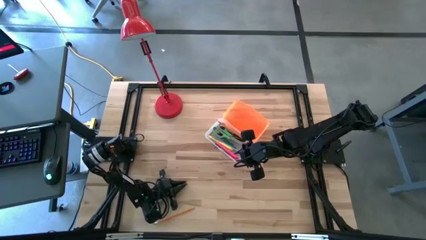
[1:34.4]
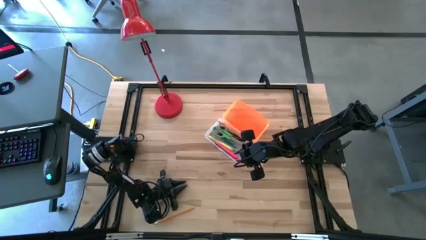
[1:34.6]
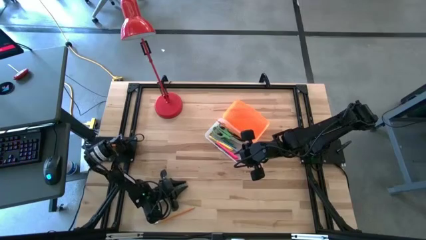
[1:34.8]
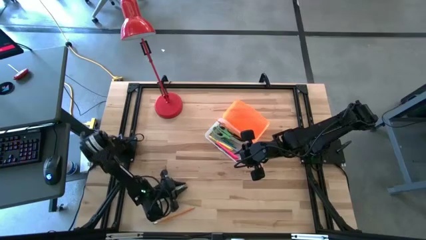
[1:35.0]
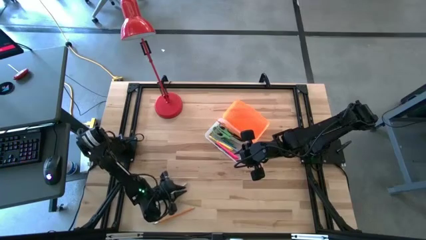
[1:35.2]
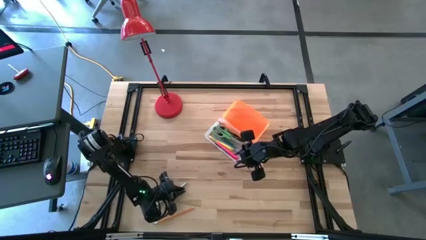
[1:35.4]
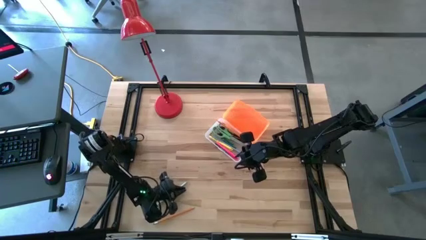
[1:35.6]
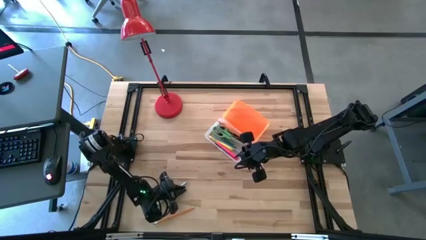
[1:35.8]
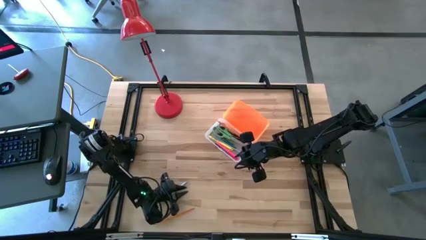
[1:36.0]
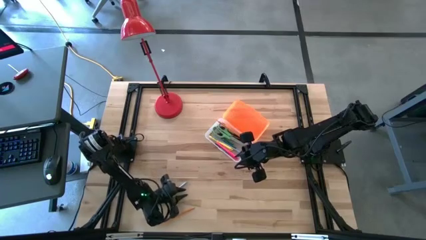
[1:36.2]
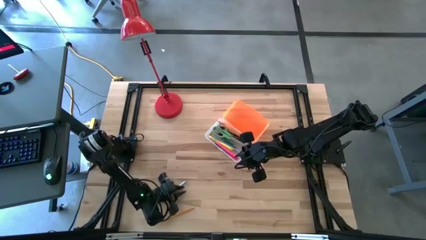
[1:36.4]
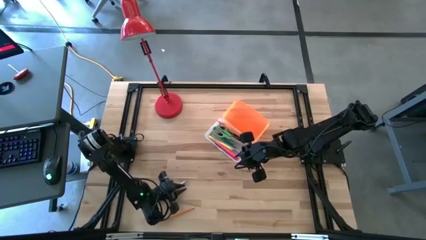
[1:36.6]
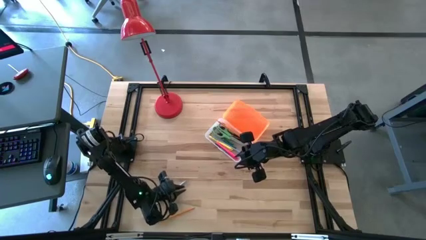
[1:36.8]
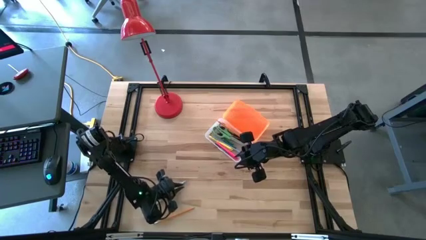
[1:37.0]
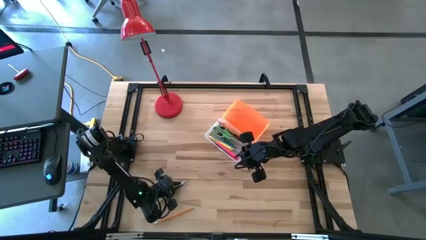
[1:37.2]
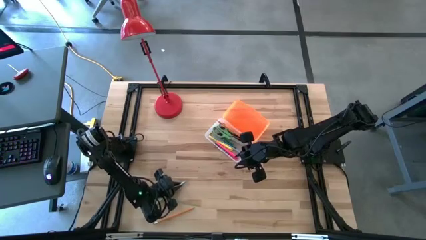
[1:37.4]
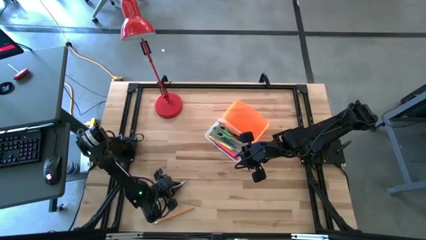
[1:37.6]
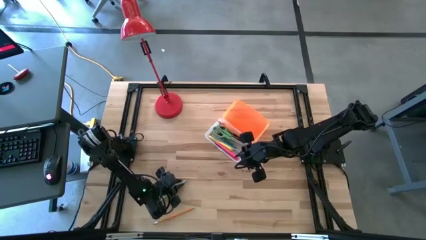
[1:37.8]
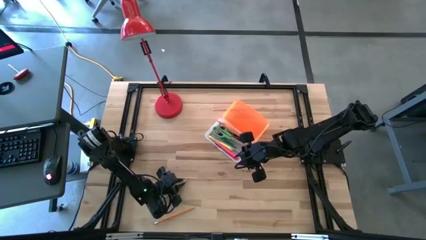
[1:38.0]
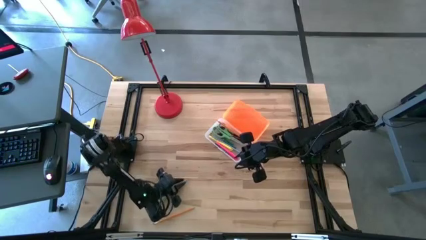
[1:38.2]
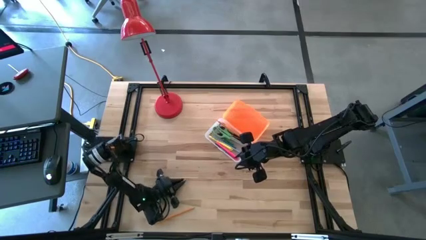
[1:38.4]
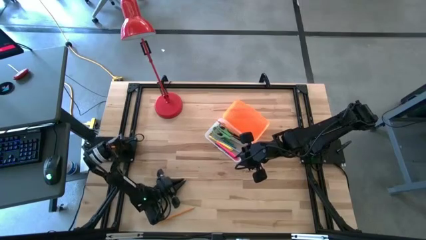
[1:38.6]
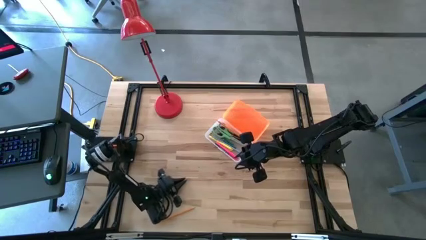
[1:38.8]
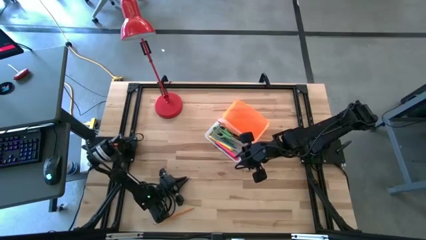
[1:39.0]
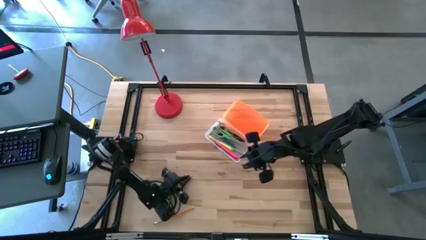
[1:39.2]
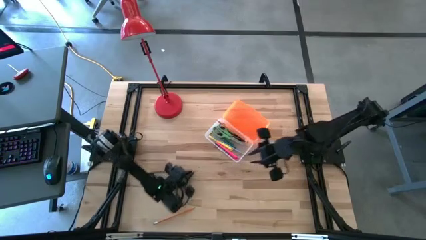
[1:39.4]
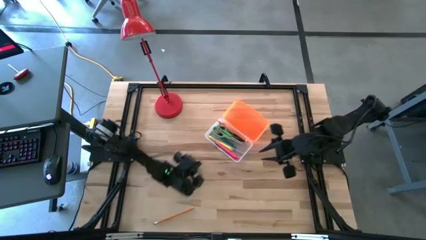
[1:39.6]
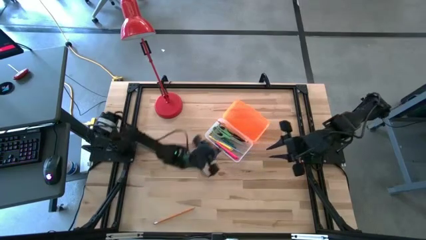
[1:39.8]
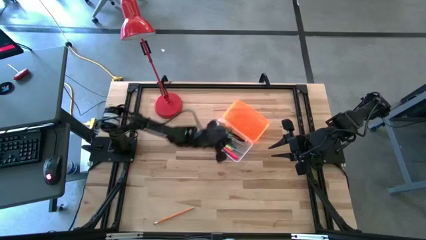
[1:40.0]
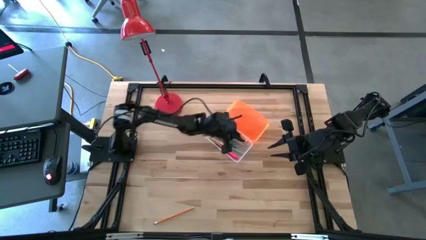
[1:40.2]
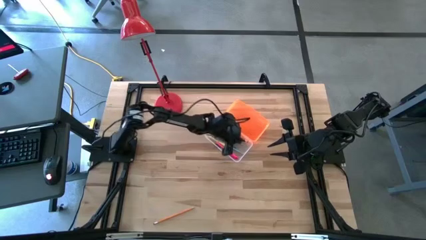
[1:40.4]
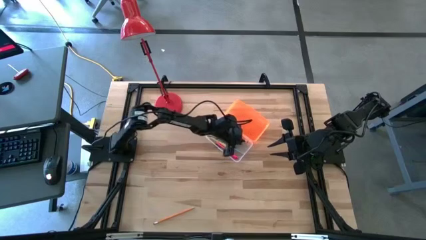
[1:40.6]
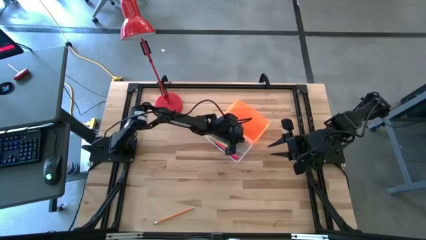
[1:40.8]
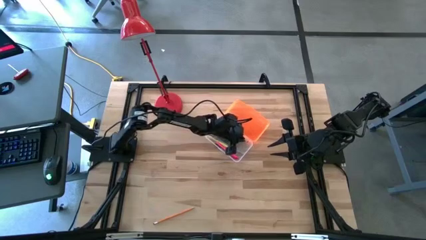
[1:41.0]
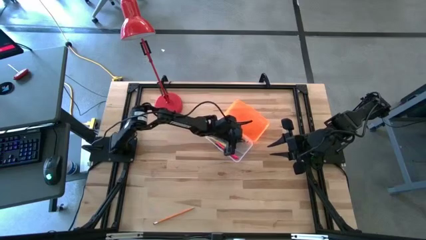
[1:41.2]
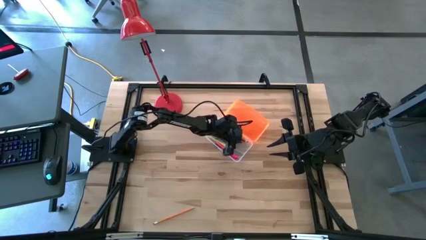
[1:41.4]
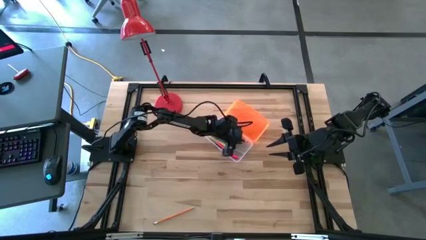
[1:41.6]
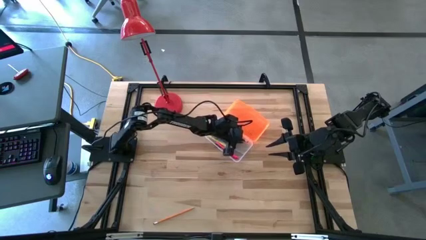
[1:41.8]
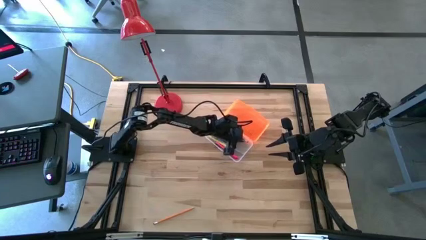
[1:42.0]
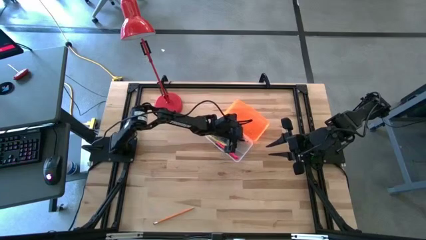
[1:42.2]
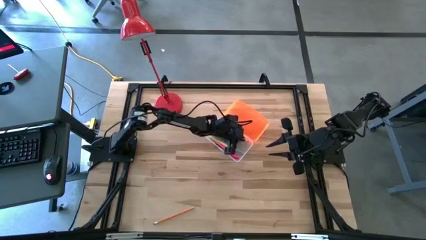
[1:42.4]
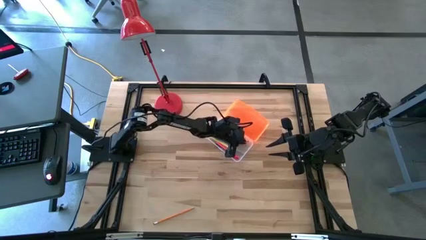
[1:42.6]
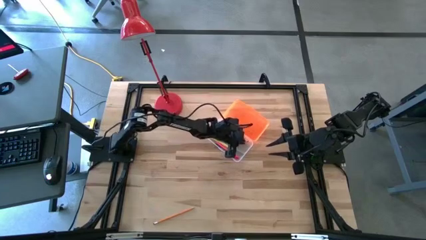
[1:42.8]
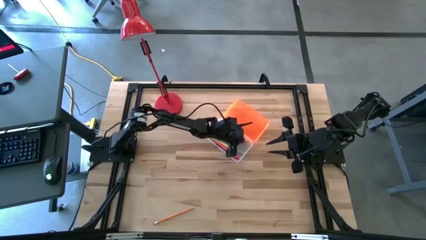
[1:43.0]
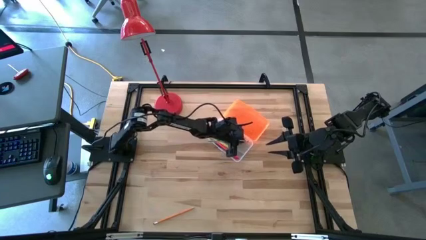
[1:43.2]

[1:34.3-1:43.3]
Task: Pick & place school supplies into a supply box
Put the light blue pencil into the supply box

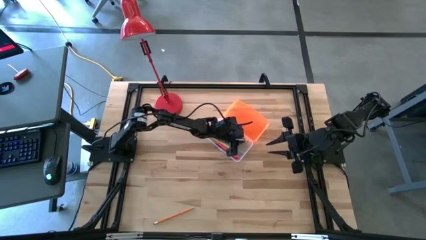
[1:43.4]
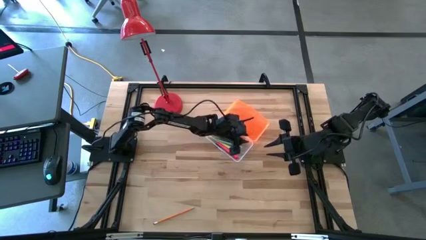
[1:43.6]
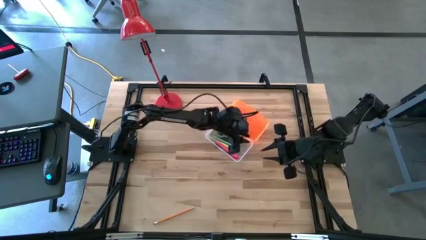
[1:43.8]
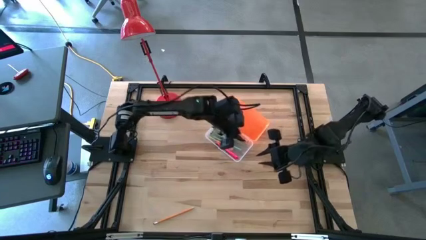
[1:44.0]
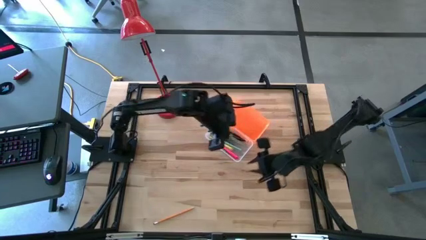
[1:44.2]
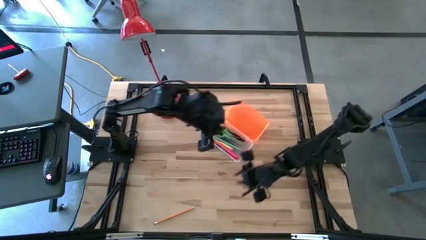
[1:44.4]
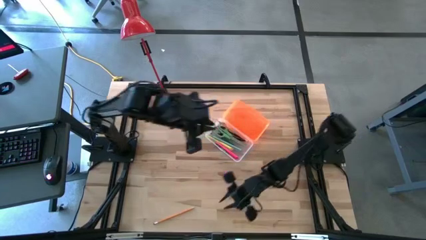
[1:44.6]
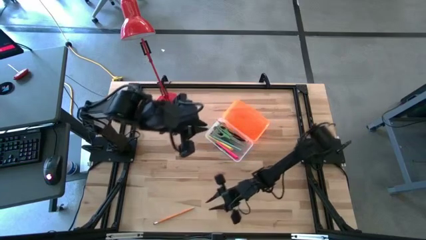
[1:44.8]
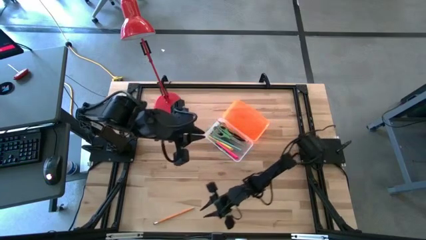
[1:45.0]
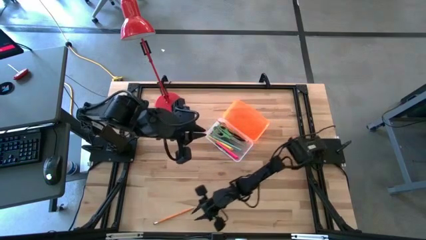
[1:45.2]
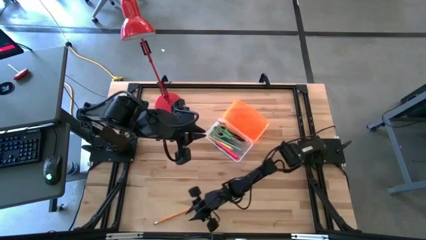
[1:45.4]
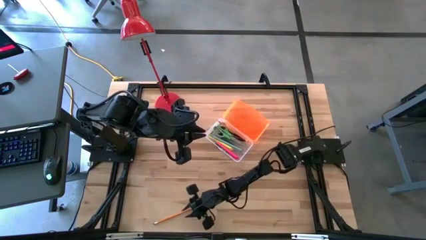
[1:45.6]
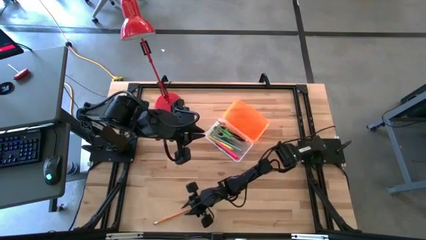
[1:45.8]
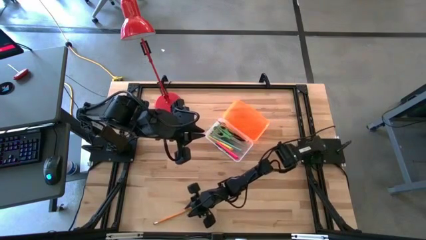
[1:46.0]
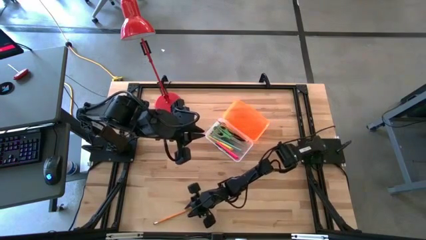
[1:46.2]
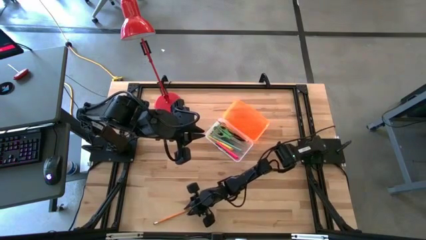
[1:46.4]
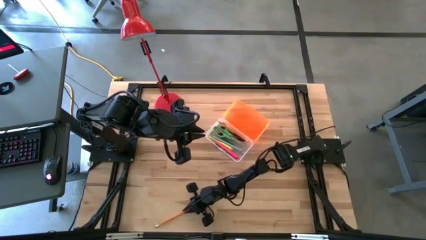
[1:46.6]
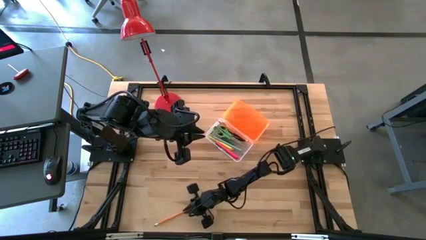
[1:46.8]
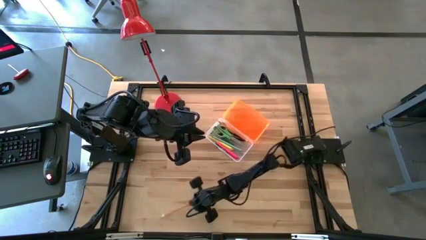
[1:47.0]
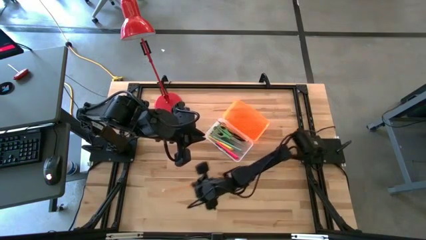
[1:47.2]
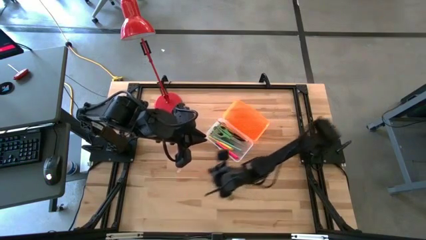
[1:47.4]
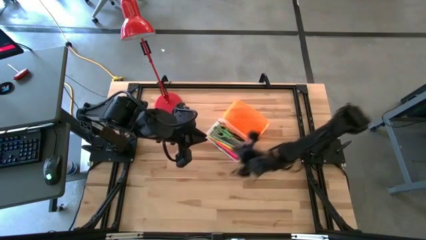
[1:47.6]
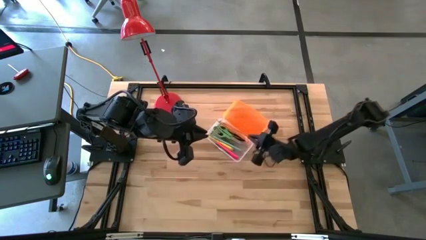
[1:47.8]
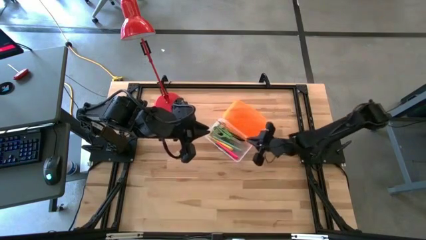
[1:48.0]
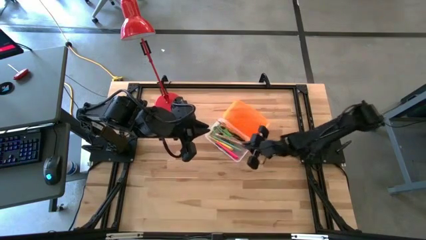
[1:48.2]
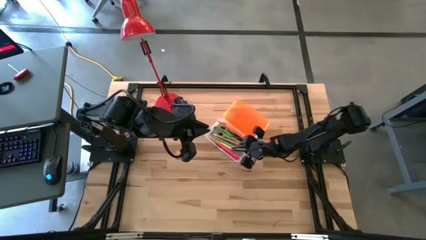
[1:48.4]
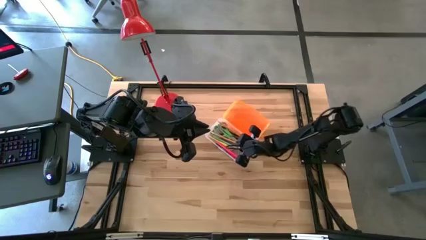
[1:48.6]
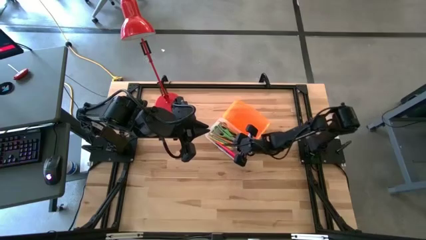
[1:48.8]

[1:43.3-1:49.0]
Put the orange pencil into the supply box

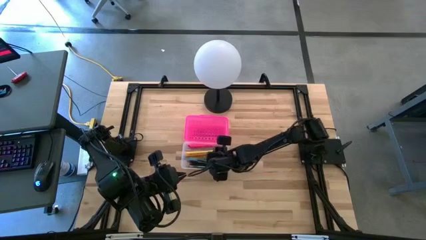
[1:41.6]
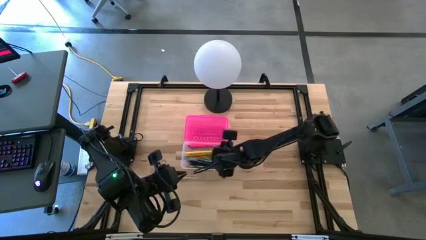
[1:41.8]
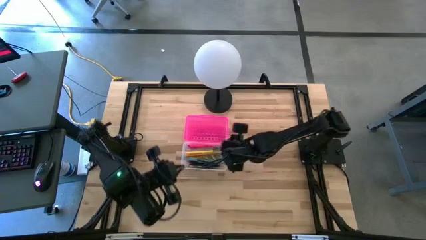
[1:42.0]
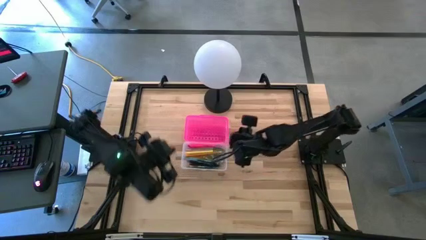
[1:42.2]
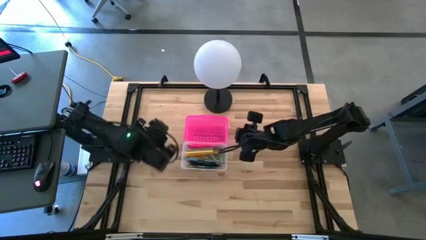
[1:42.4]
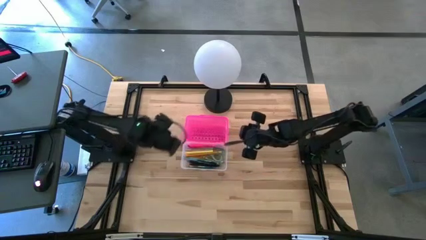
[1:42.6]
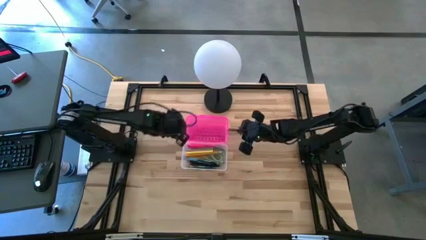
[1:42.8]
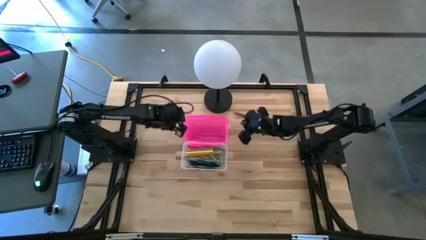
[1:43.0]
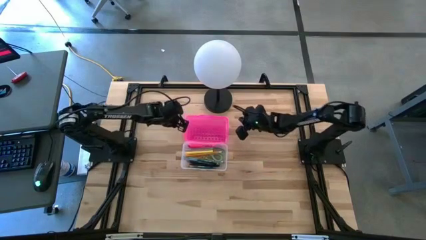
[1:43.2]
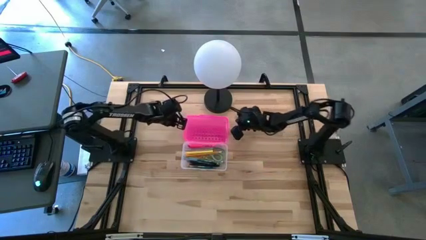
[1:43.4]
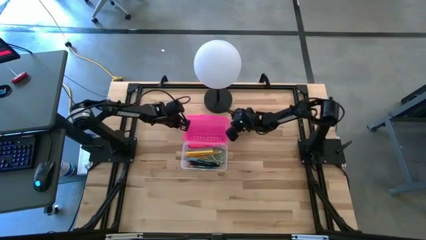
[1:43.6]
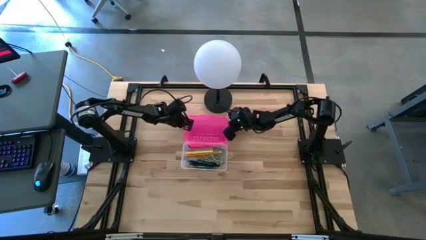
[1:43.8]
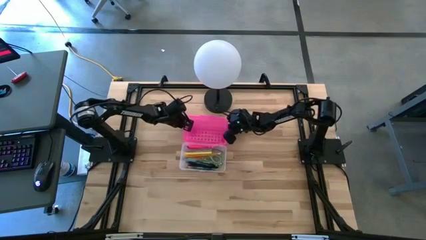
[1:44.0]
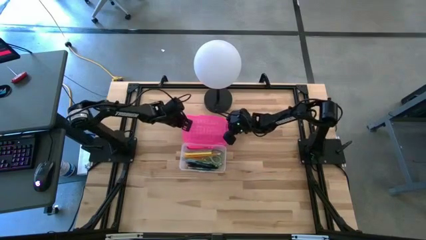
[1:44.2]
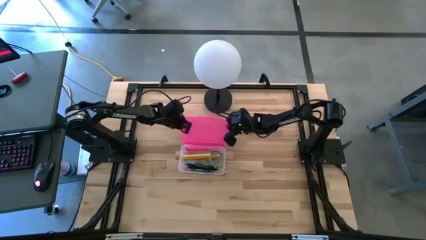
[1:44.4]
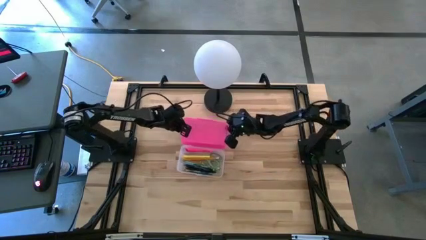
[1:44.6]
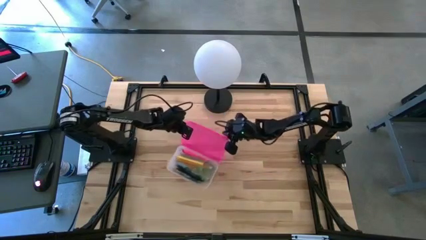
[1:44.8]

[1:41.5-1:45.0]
Task: Pick & place school supplies into a supply box
Close the pink supply box
